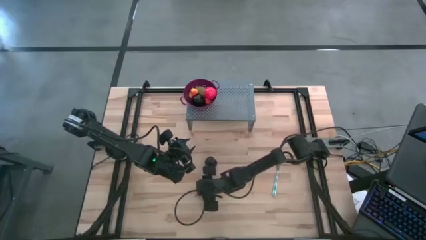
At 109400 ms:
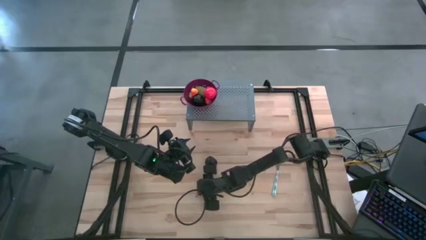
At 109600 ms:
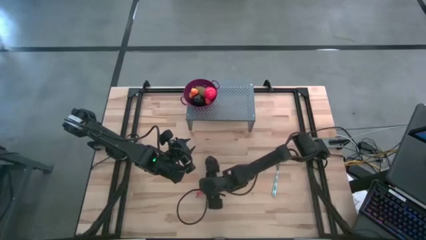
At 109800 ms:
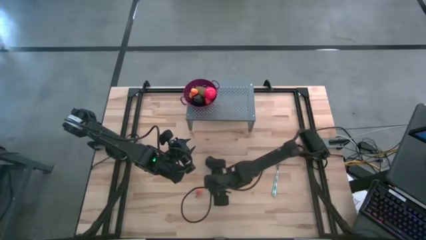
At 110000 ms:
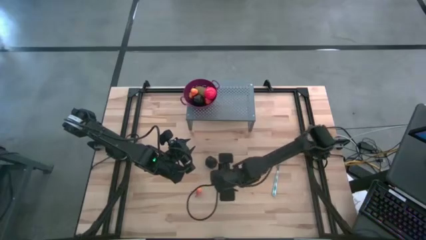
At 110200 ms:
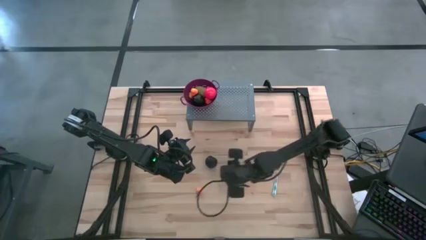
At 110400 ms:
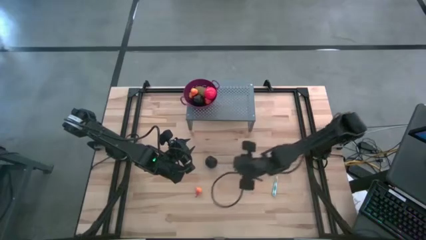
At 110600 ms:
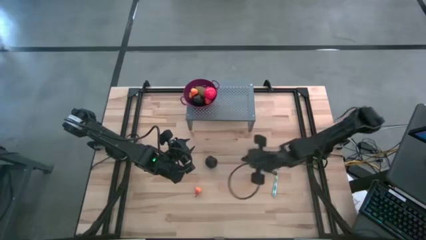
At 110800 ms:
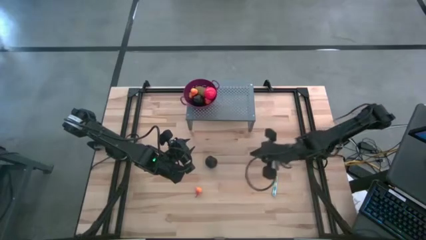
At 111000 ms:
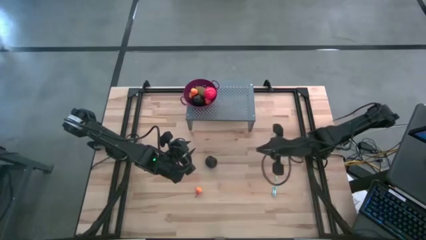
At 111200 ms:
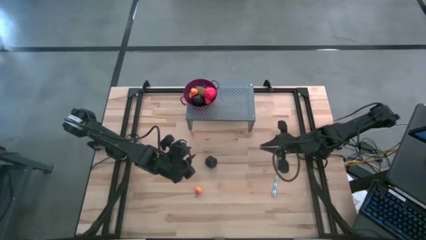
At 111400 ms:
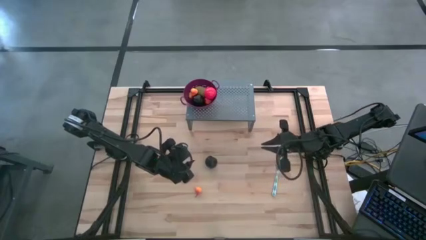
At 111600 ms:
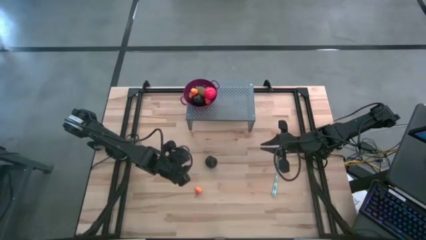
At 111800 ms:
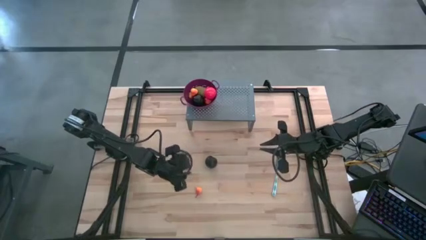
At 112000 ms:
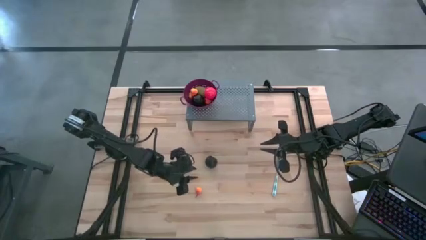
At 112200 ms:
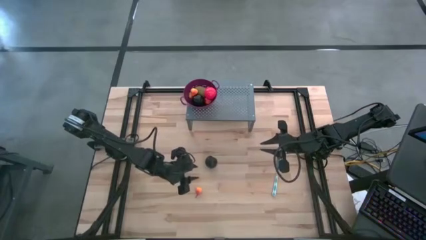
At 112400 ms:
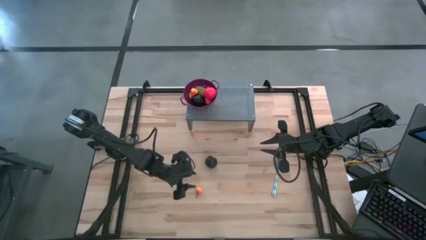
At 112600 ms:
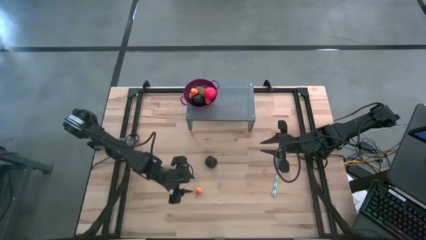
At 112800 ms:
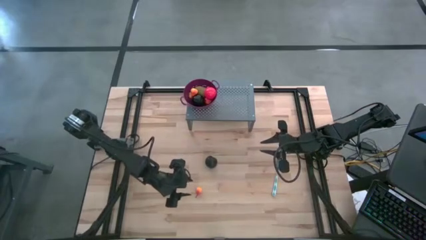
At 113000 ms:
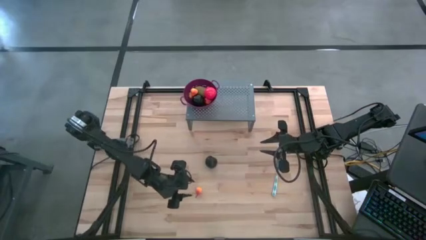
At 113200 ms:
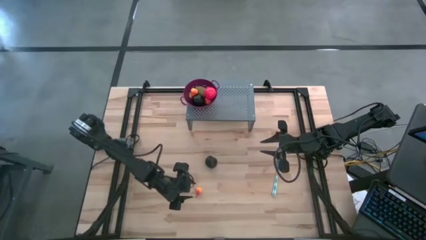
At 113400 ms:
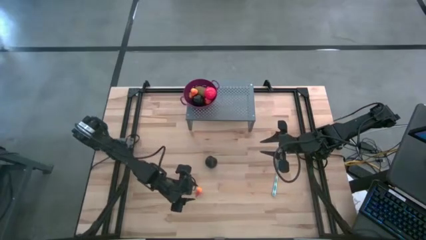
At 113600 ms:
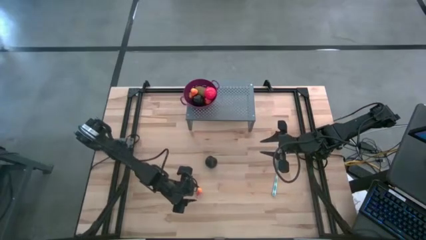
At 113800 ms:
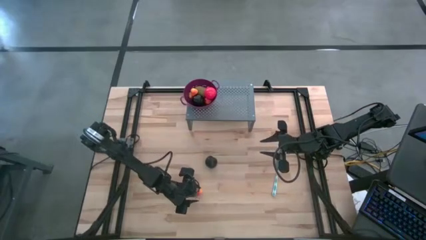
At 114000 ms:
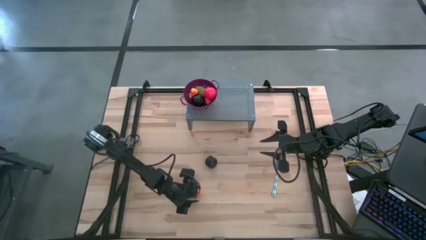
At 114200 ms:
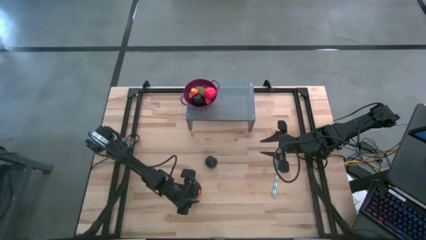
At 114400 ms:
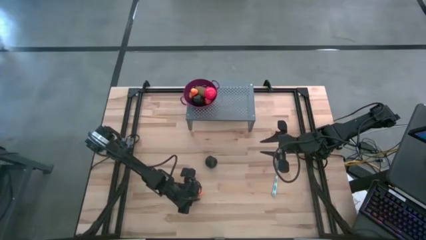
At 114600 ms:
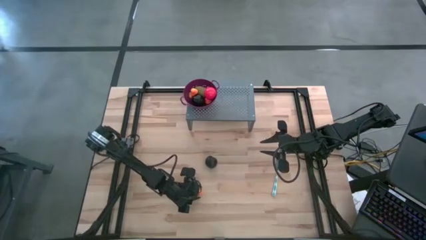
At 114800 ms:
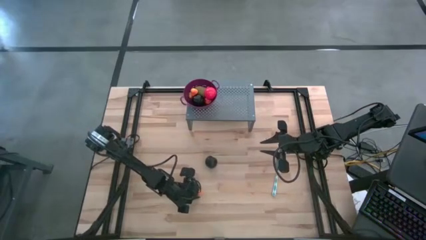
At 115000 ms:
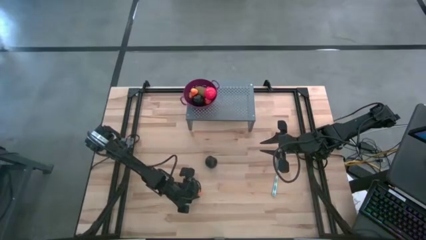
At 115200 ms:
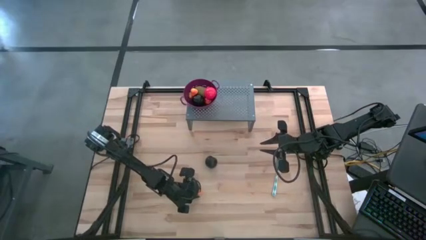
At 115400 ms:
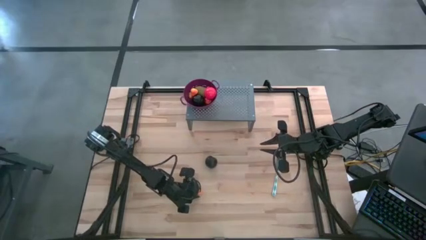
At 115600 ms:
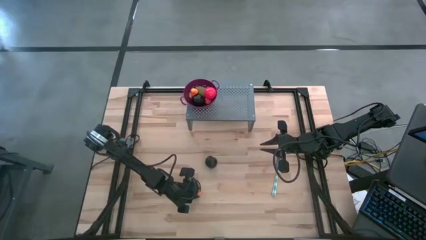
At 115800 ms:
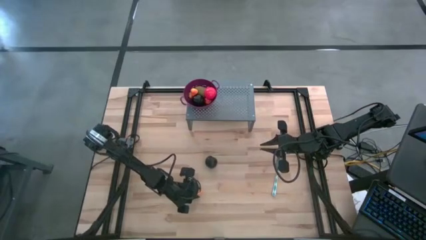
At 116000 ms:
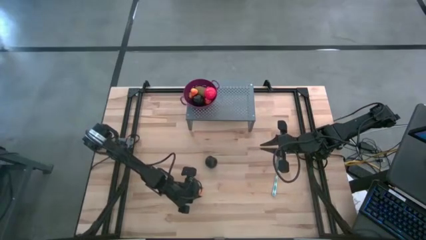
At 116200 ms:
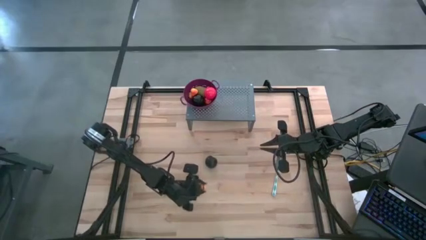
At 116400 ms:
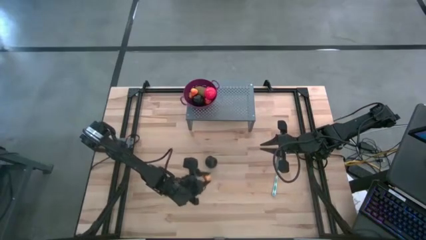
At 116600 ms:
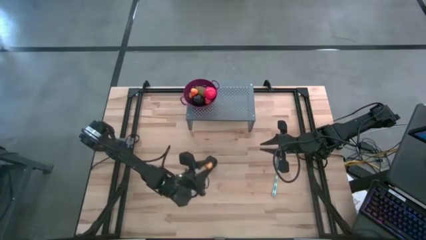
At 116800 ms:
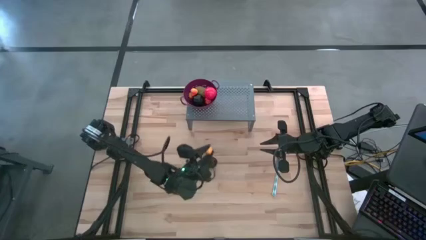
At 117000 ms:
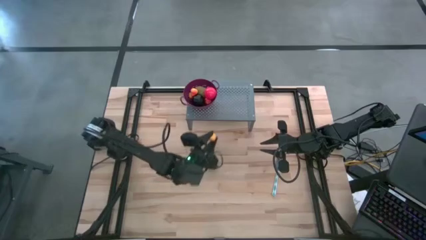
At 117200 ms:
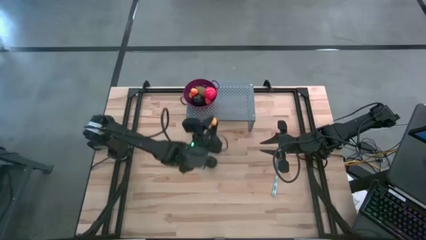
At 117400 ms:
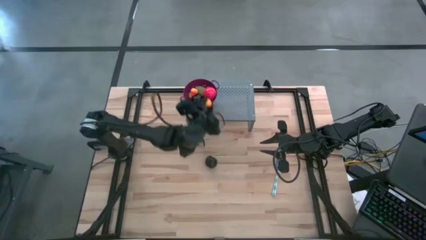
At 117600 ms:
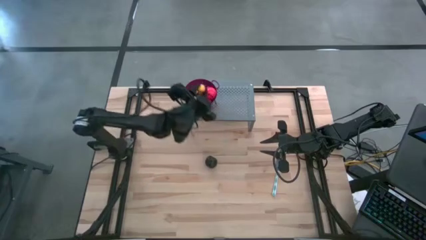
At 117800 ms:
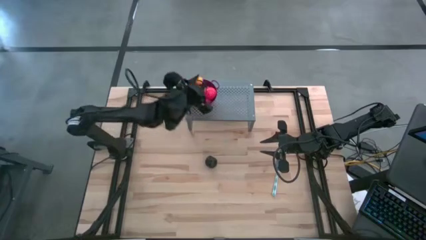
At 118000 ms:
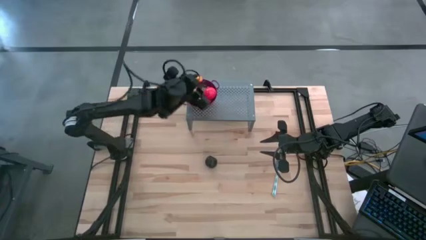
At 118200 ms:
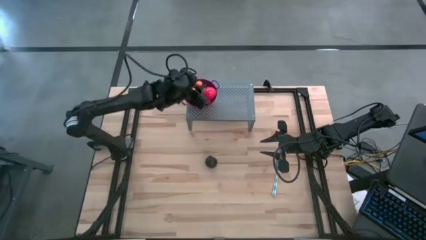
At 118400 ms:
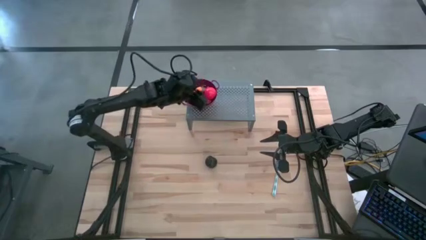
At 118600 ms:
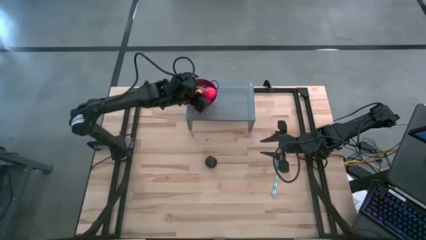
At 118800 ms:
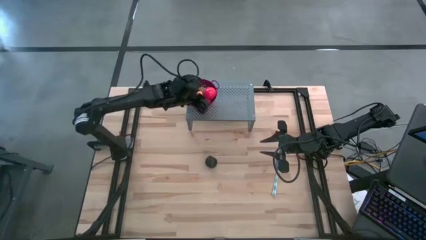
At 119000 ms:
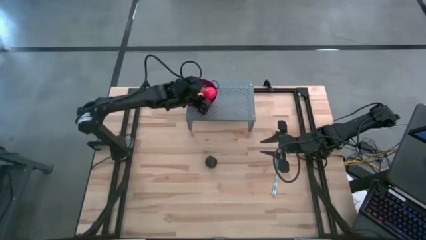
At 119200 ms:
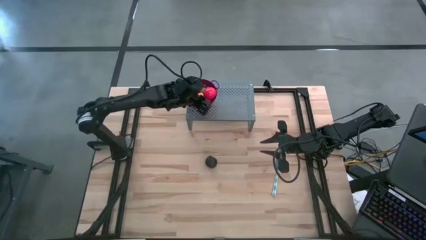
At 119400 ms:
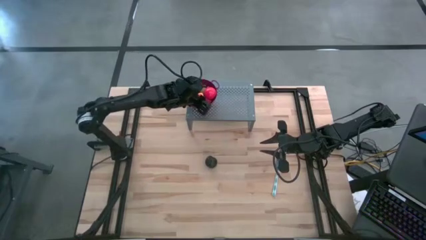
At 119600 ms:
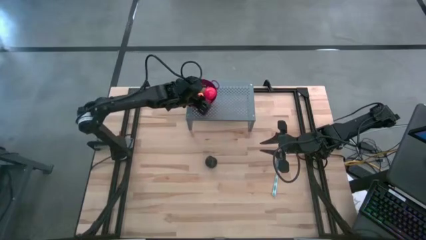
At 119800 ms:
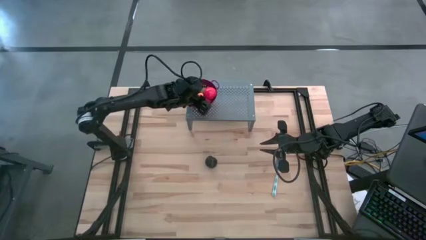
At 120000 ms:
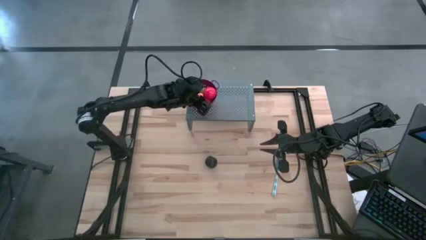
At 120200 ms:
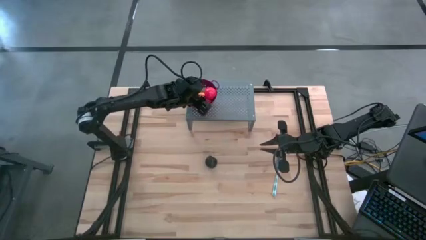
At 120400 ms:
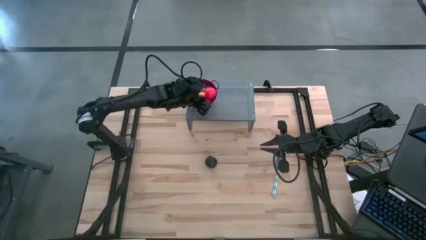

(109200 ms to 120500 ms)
Task: Pick & Place Fruit
Put the yellow pear into the purple strainer bowl on the shelf

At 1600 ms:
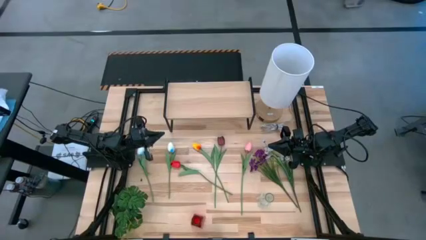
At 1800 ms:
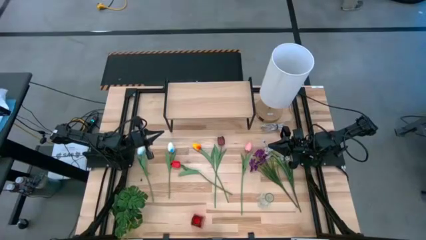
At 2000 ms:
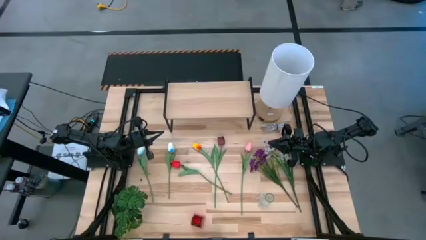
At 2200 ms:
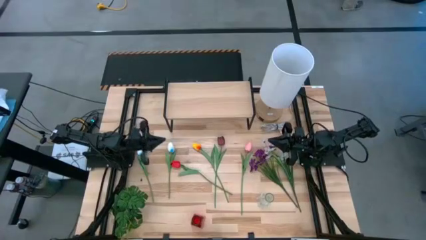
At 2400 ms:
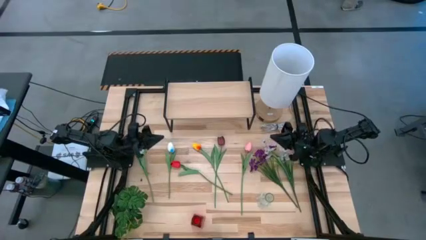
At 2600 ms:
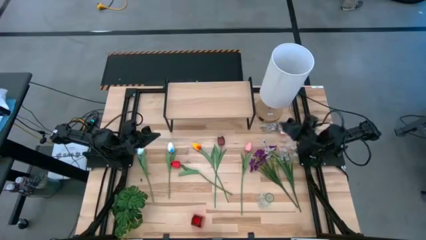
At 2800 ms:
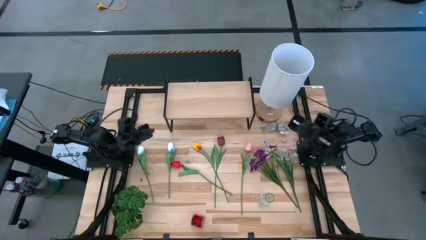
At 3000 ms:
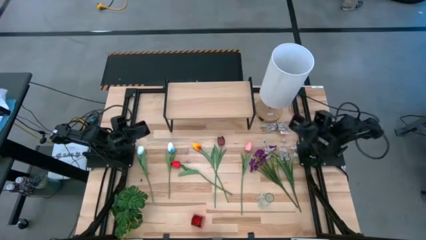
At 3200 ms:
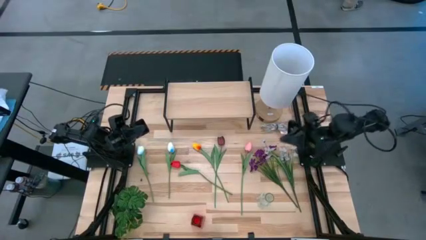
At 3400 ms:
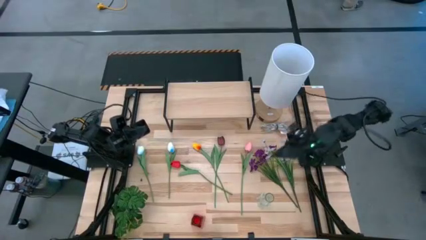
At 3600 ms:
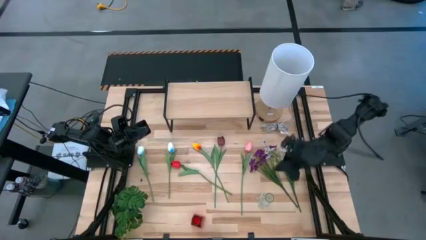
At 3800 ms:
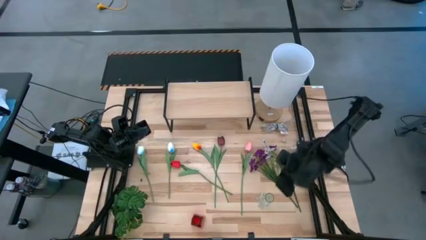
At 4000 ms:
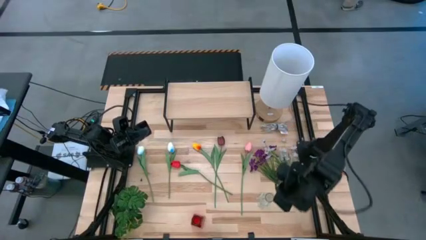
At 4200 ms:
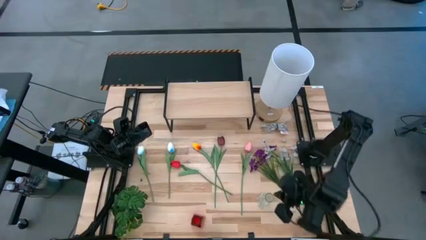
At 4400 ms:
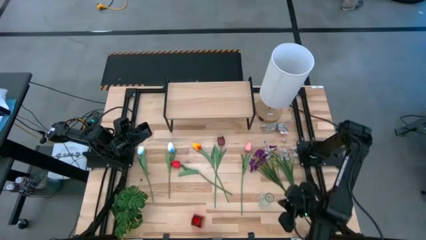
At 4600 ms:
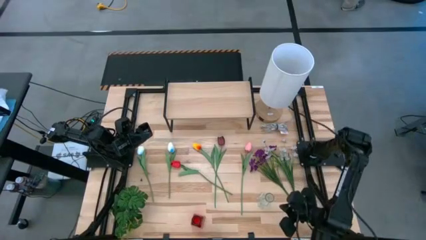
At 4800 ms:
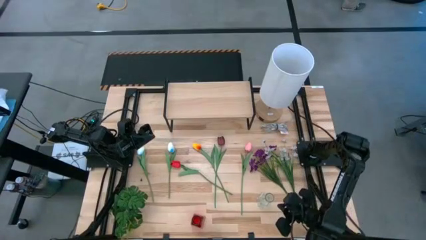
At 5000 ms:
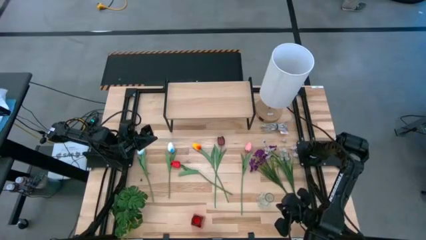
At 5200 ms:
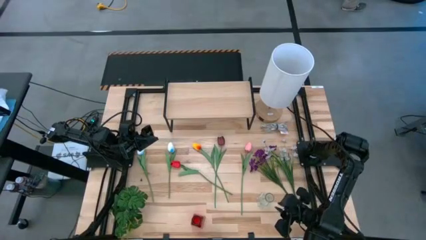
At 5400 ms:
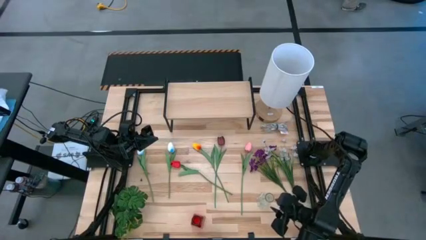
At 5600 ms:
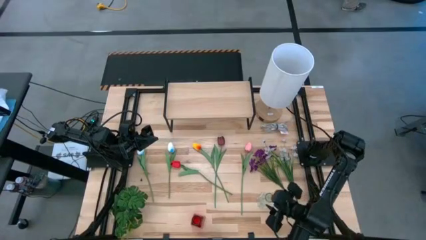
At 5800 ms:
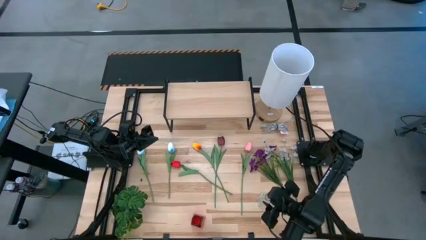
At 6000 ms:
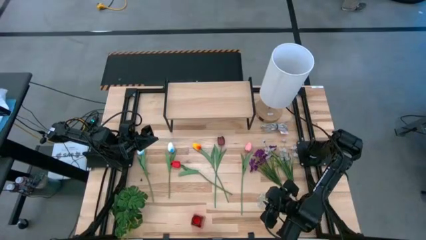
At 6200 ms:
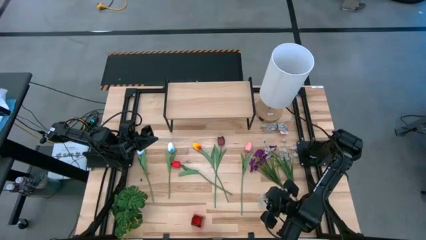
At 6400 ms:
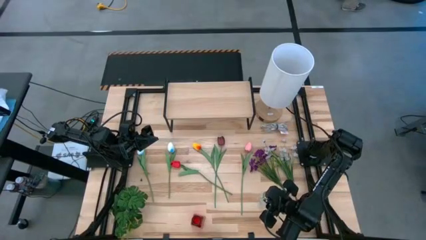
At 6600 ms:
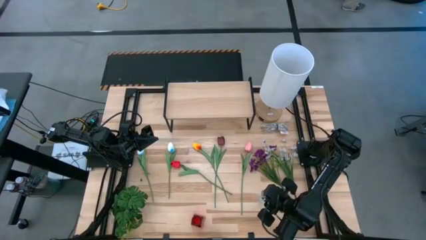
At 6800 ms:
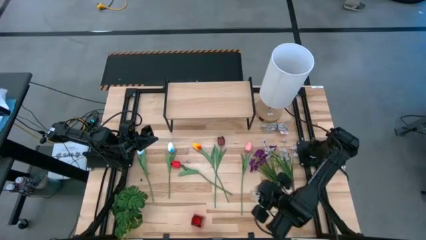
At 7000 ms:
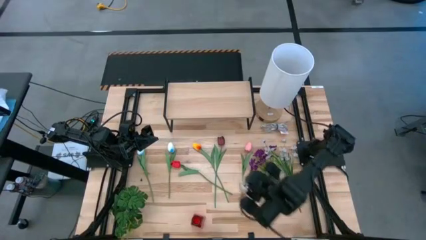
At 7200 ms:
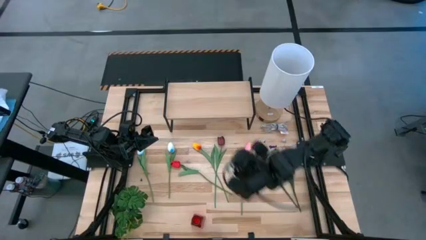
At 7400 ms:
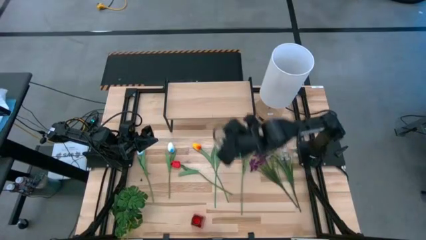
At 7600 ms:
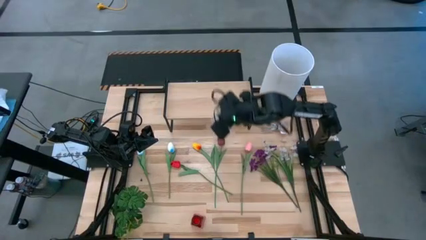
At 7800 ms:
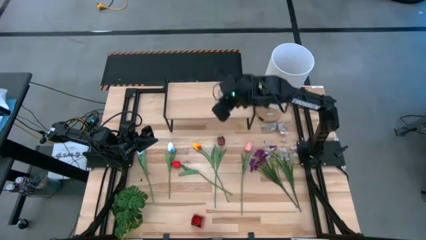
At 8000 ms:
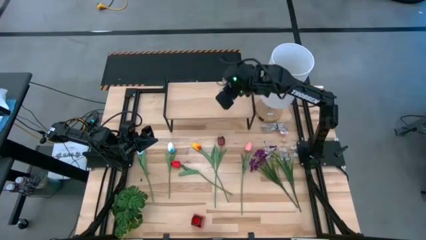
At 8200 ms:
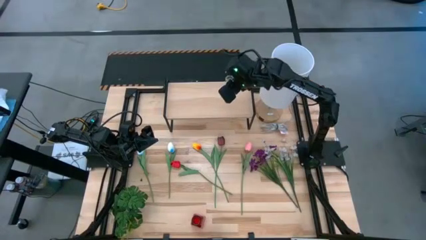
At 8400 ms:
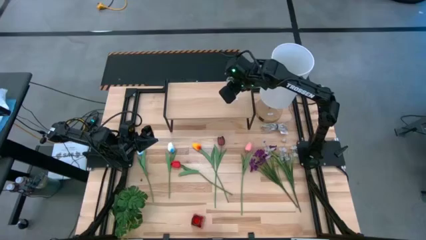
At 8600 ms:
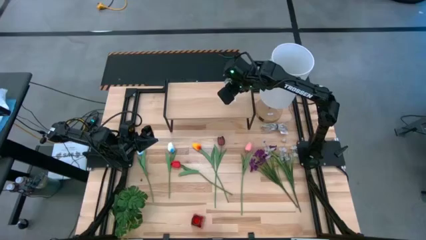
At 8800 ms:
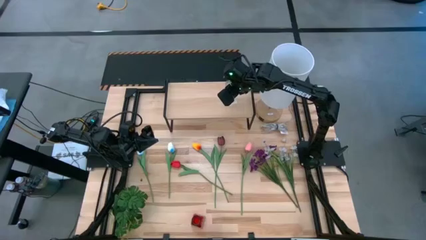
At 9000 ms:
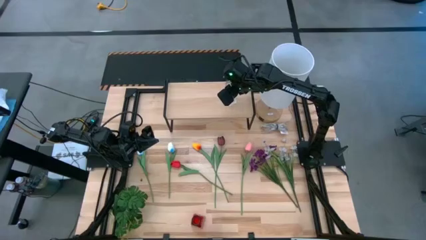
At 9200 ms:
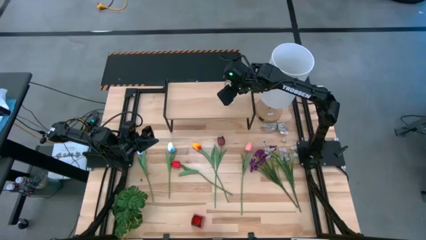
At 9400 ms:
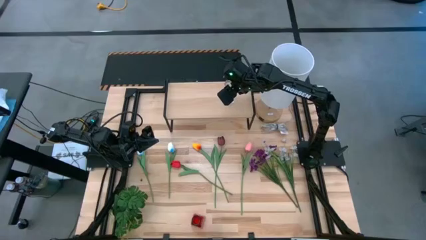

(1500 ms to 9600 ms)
Task: Pick and place flowers into a vace then onto a shelf
Put the transparent vase on the shelf
